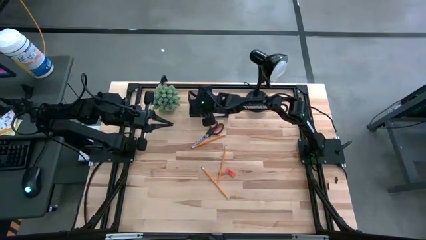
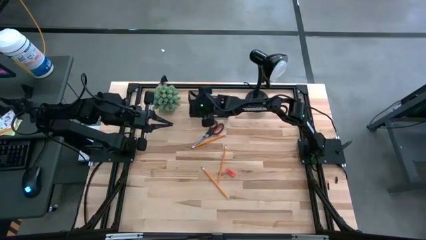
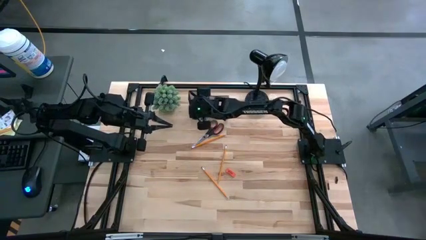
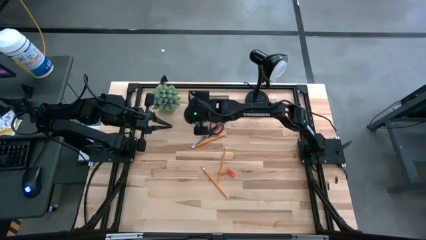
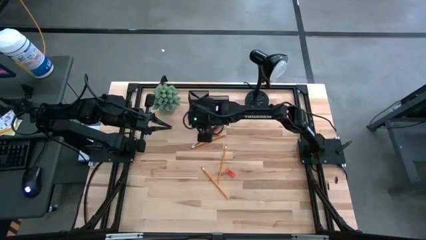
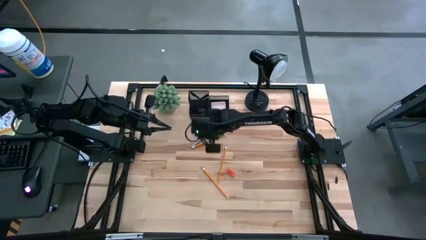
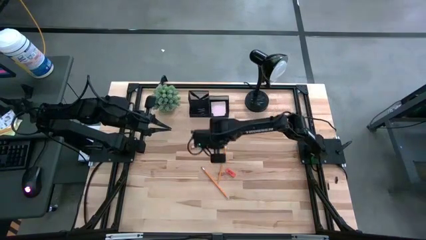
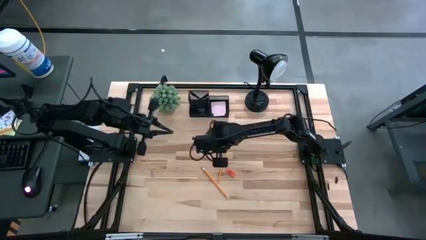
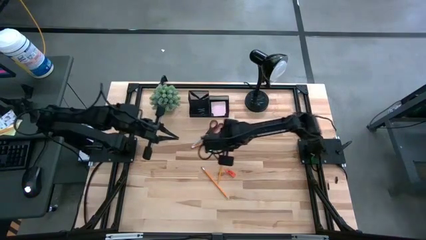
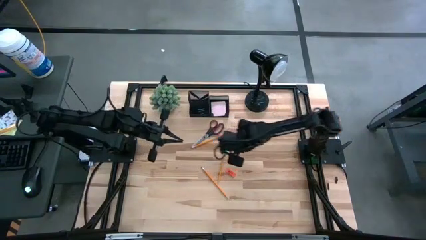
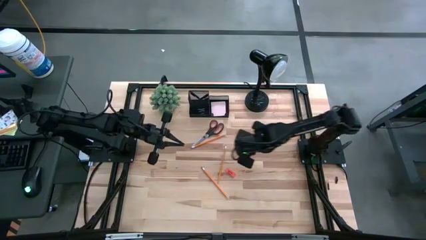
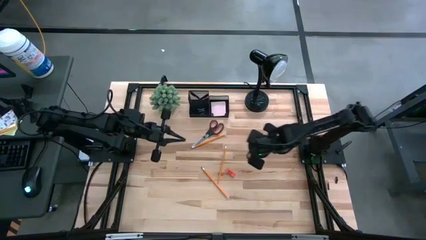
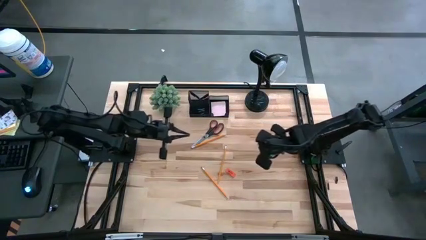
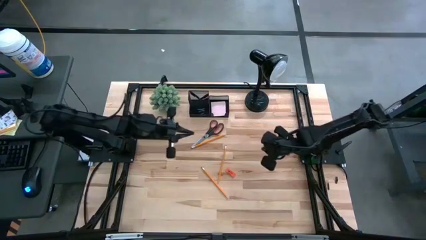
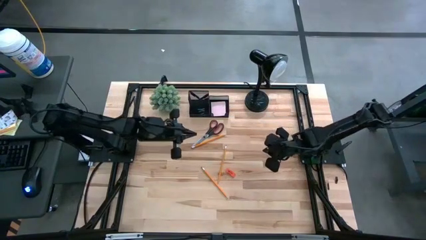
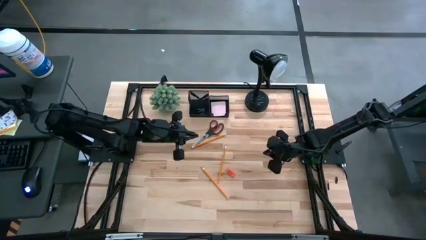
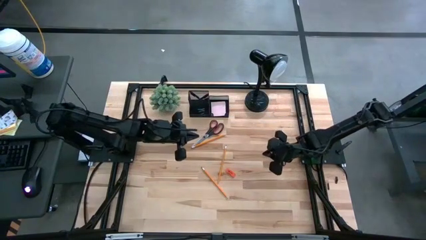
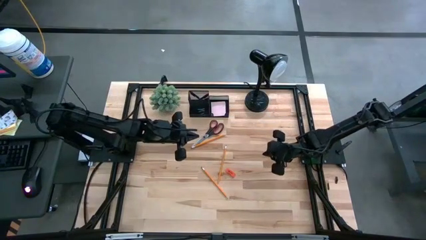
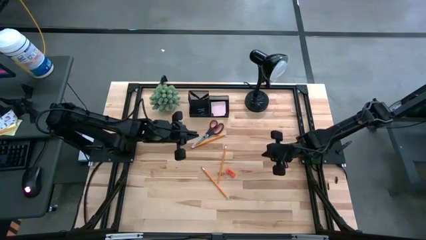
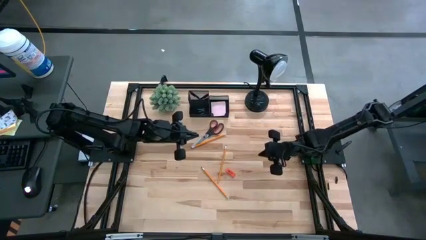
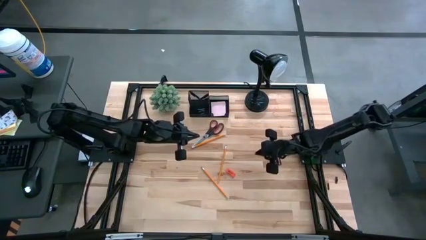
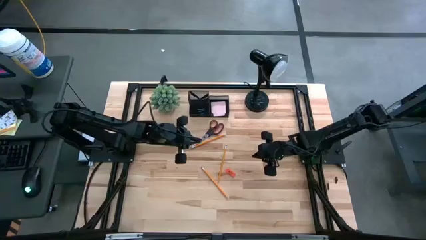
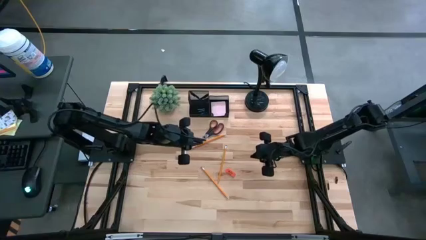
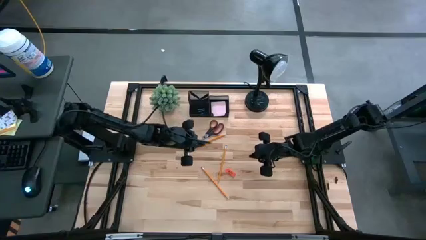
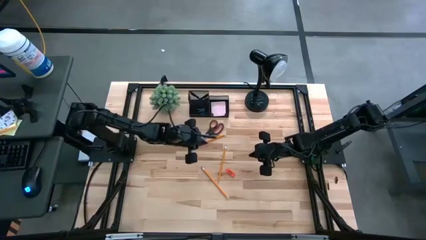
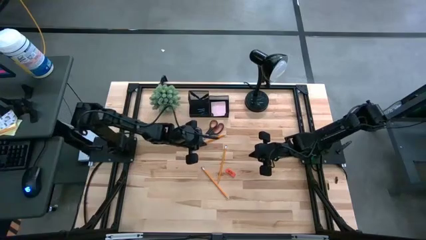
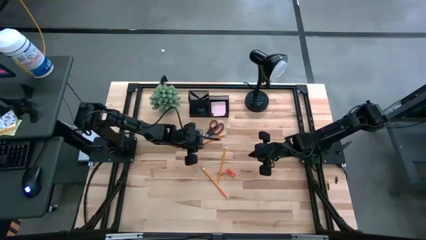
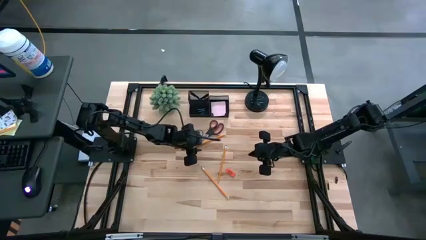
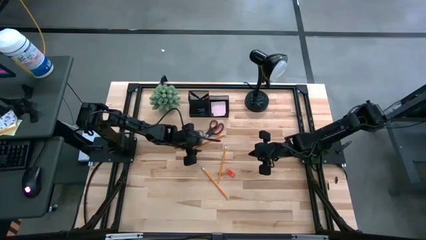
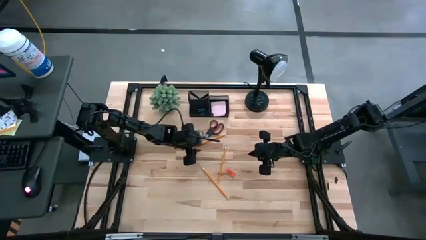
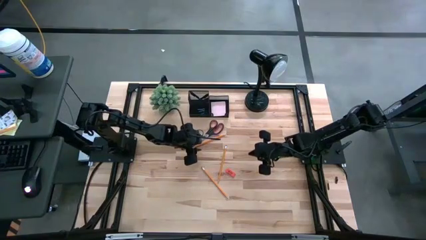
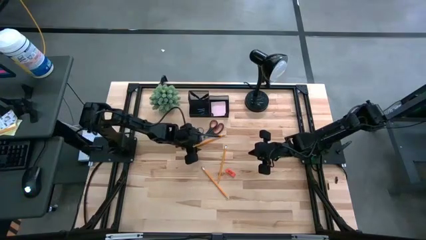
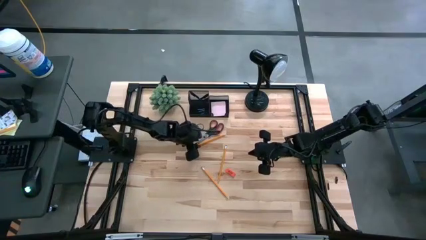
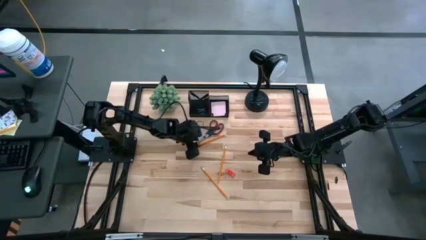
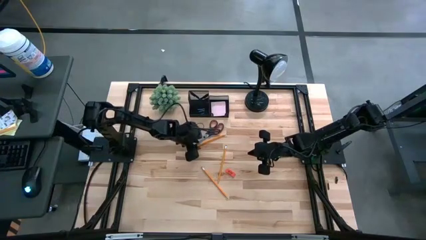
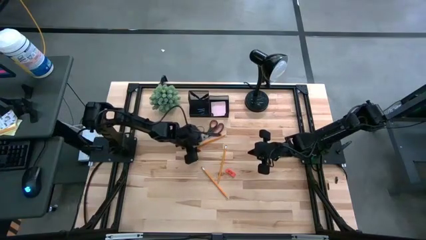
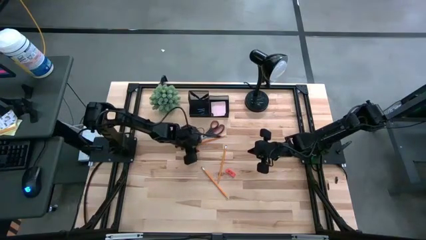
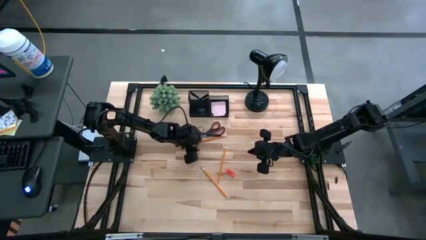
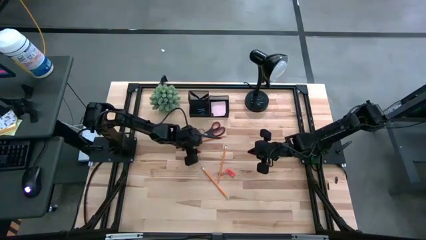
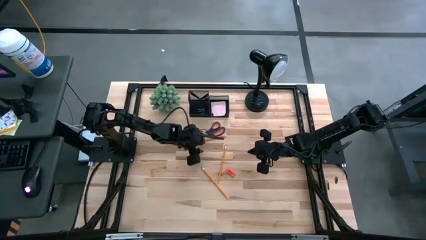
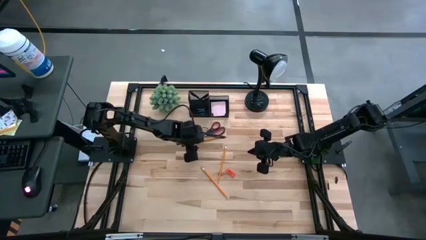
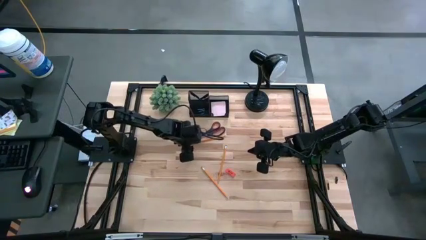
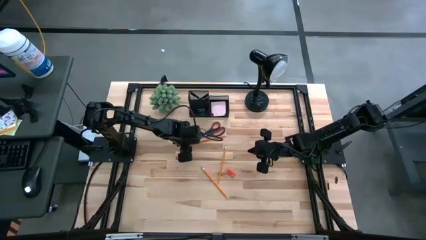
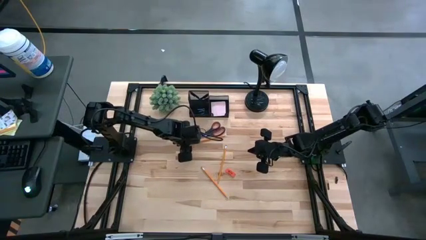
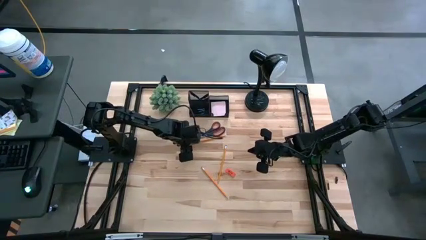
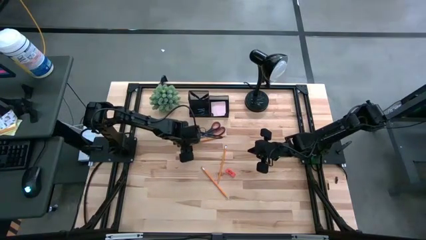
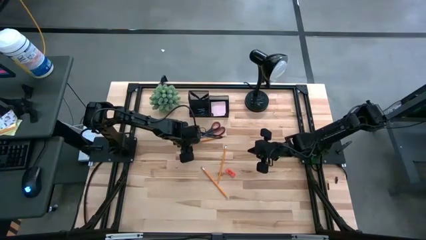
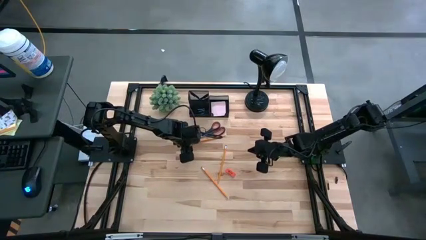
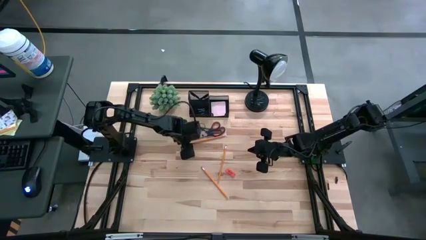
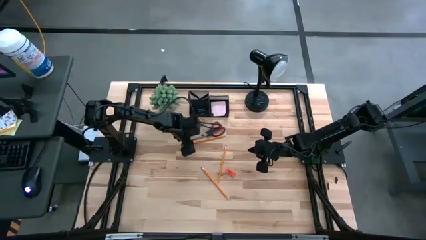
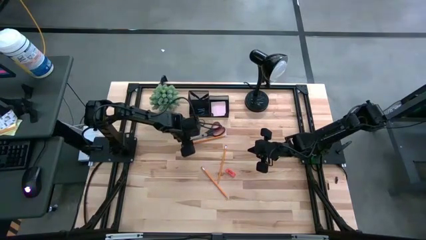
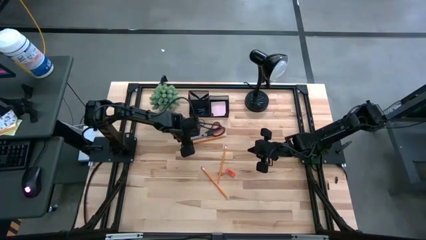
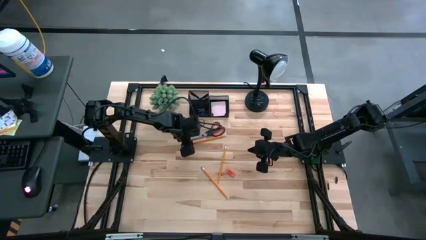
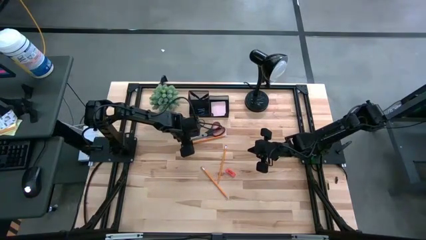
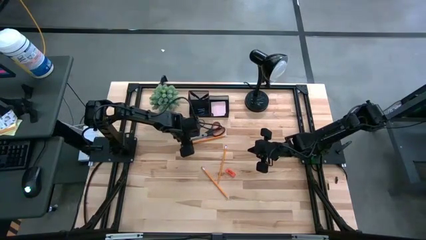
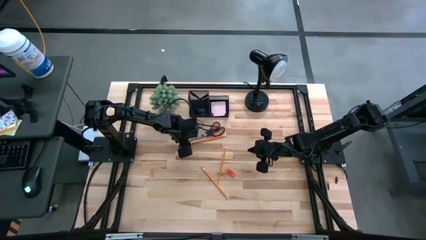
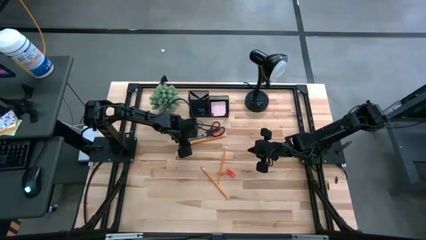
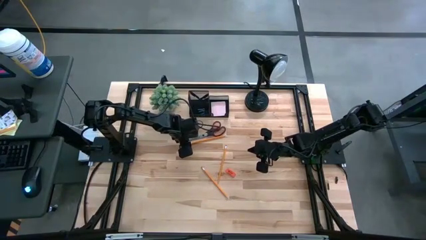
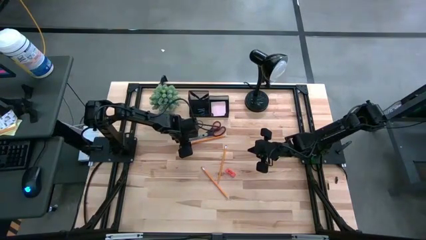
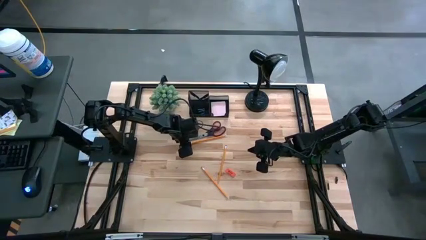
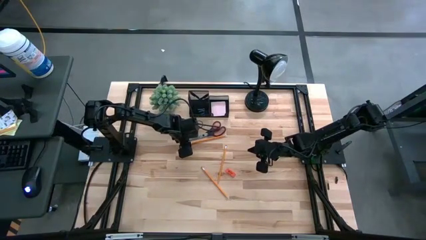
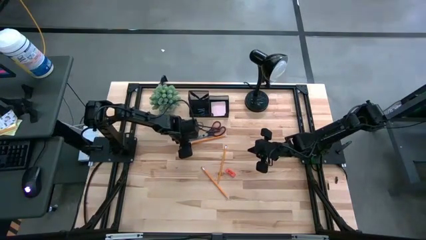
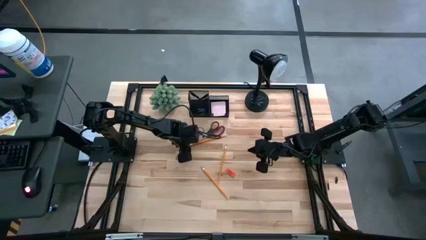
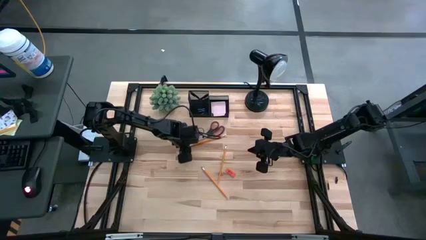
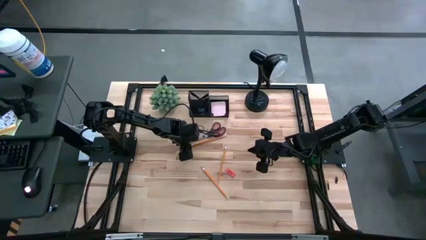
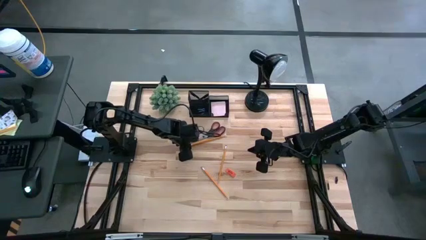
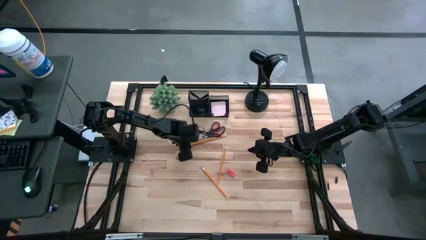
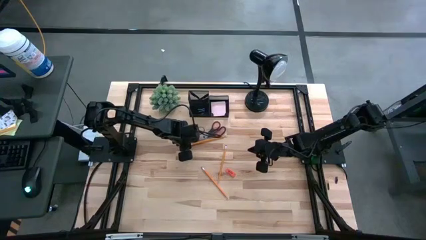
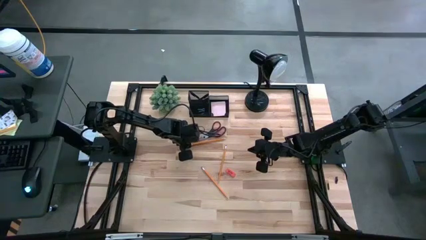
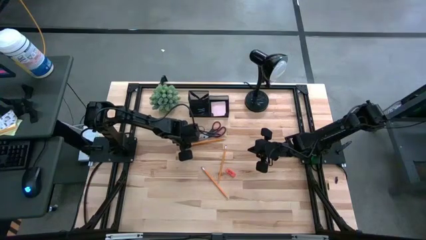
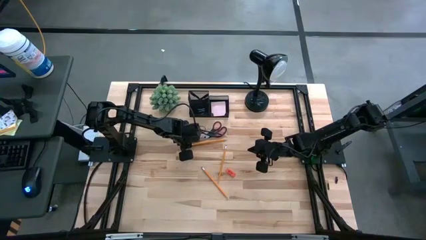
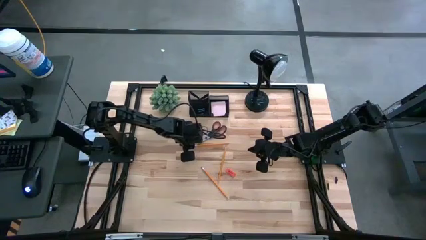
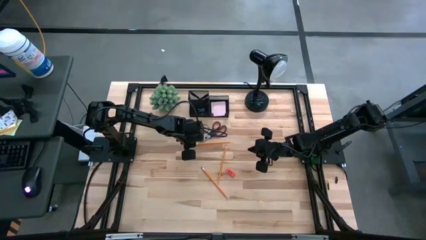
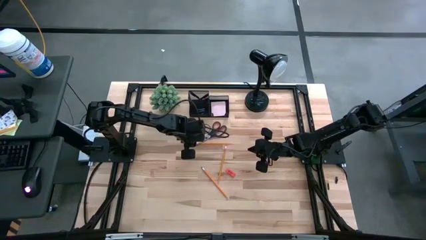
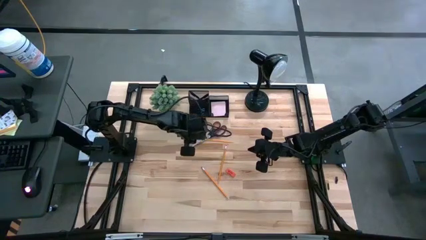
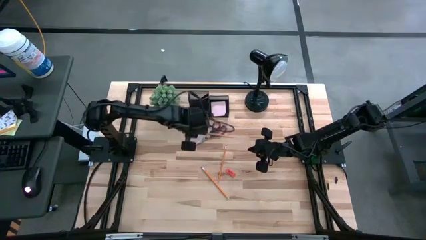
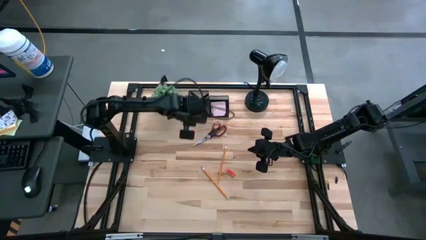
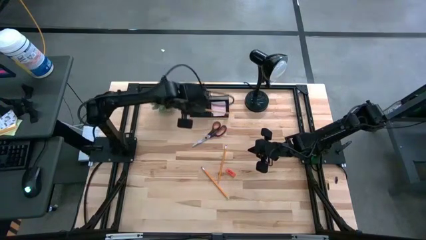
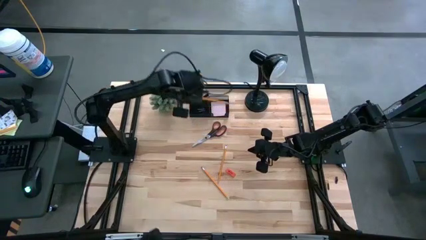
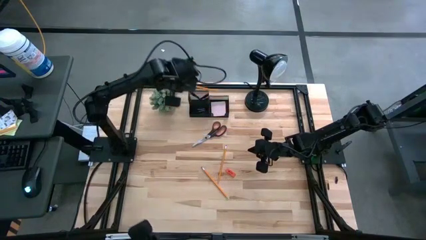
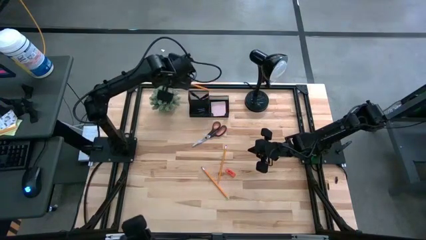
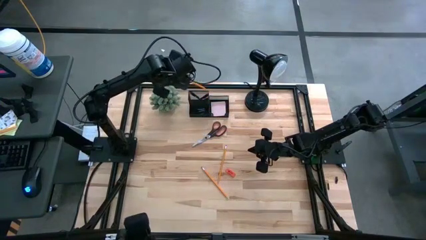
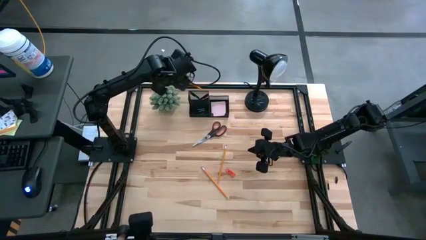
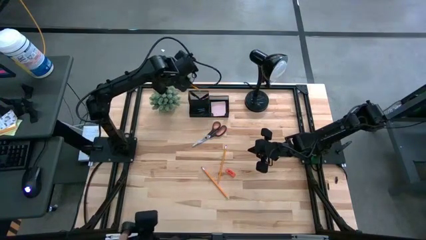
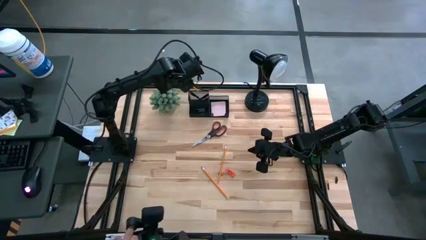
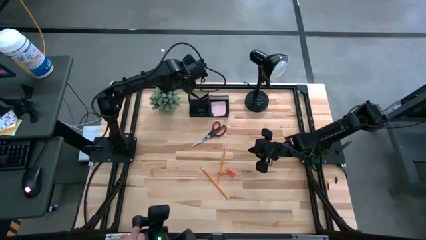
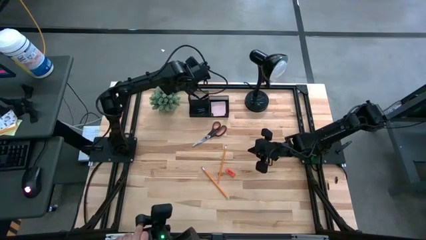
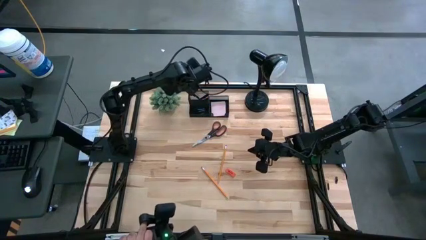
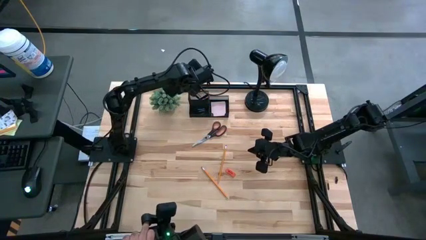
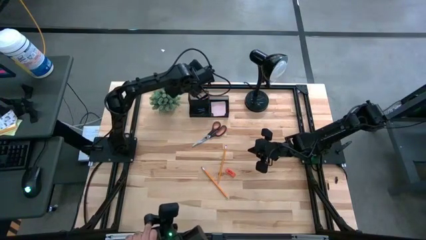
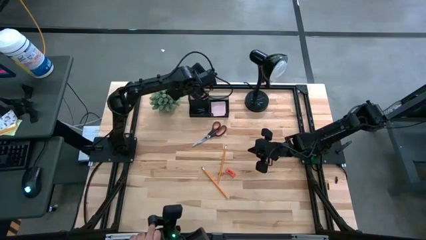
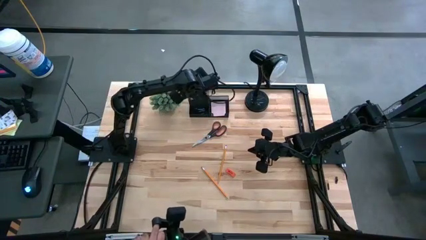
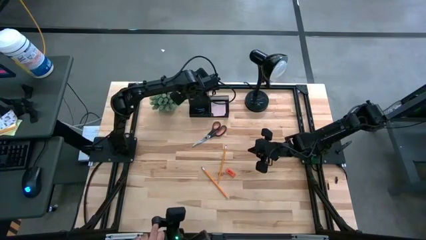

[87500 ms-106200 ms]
Task: Pick and place office supplies into organizer
Put the top pencil into the black desk organizer
